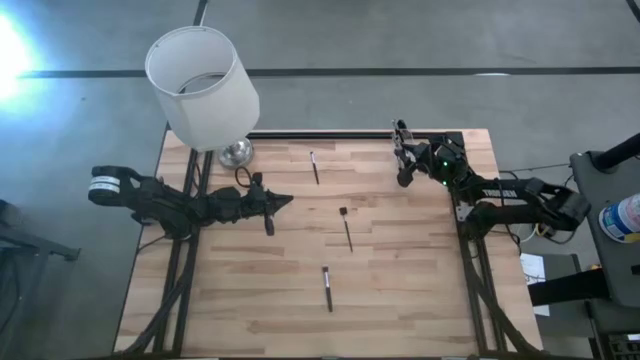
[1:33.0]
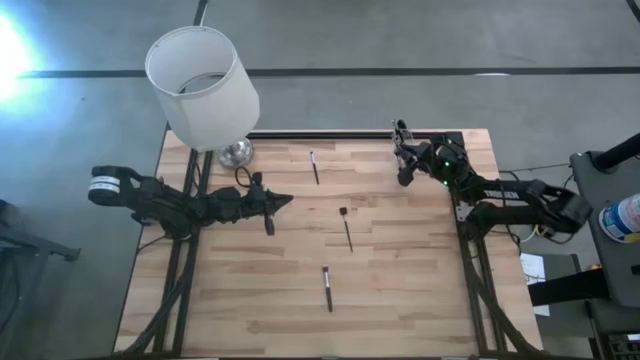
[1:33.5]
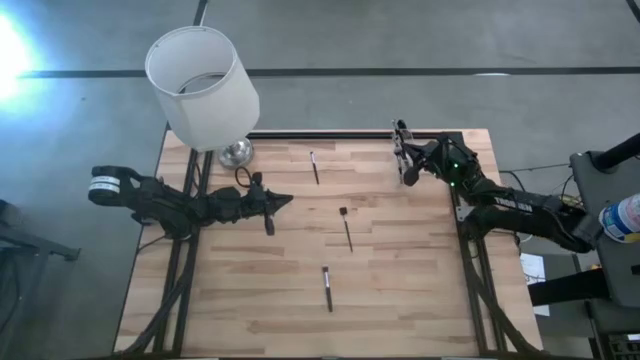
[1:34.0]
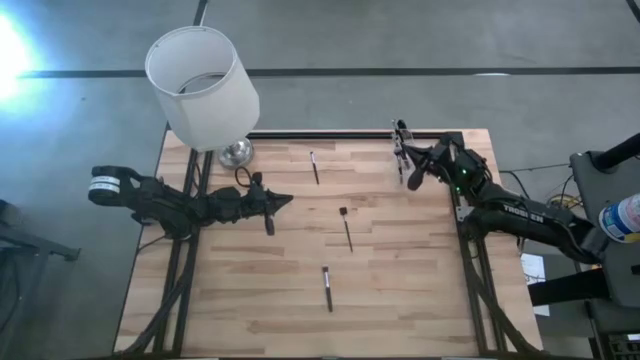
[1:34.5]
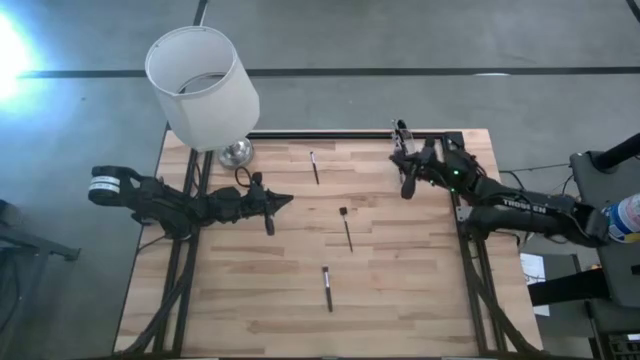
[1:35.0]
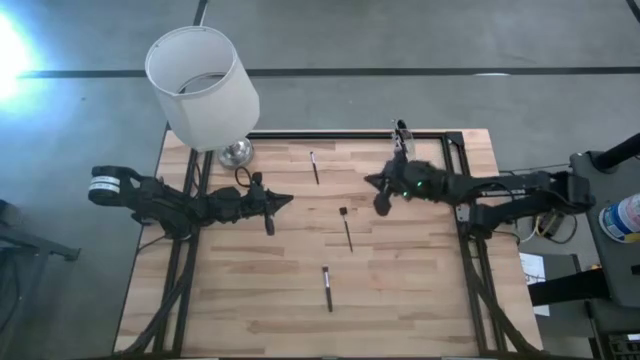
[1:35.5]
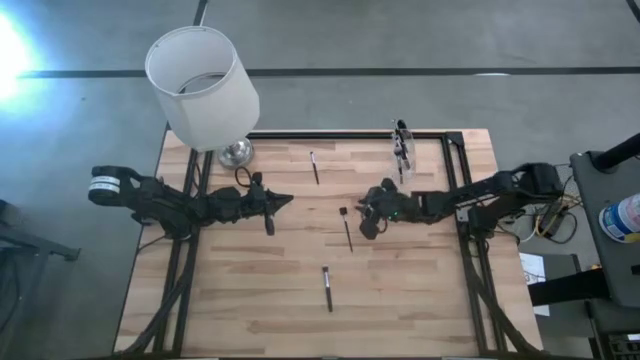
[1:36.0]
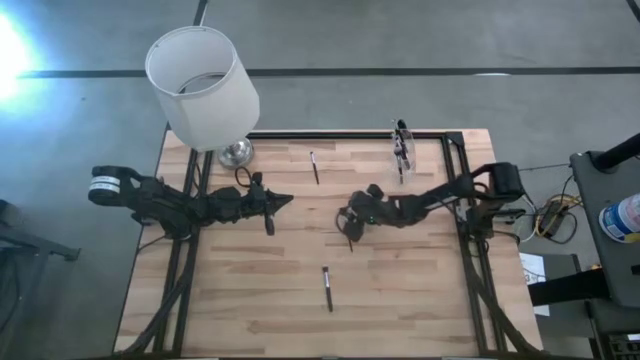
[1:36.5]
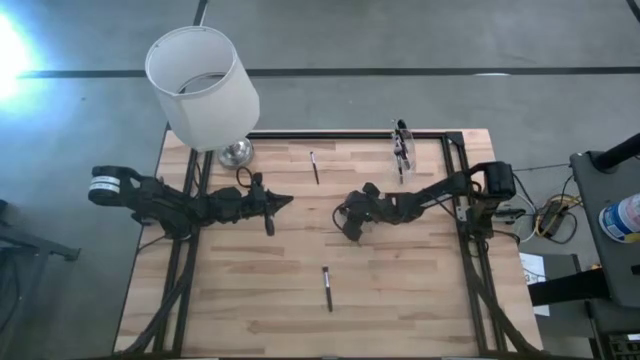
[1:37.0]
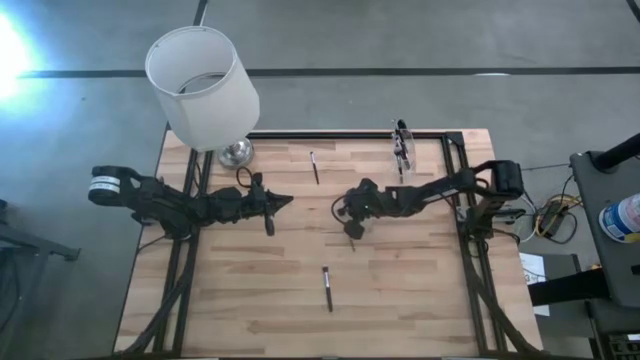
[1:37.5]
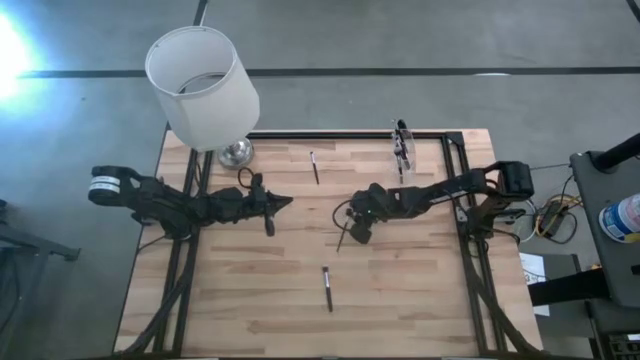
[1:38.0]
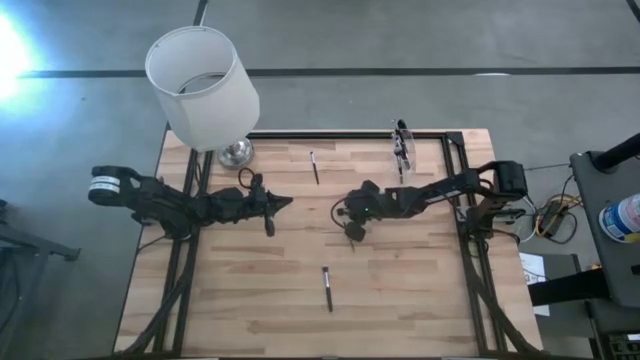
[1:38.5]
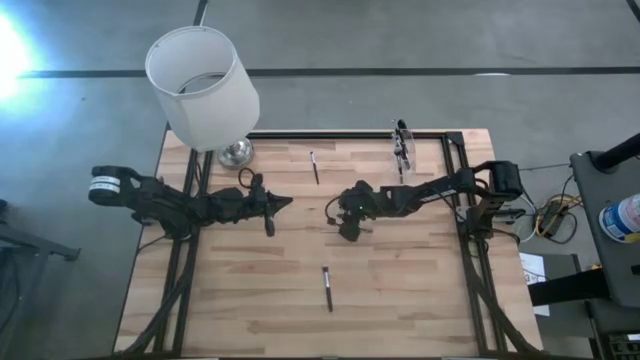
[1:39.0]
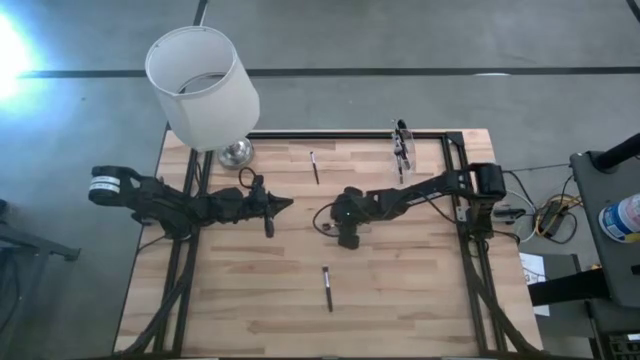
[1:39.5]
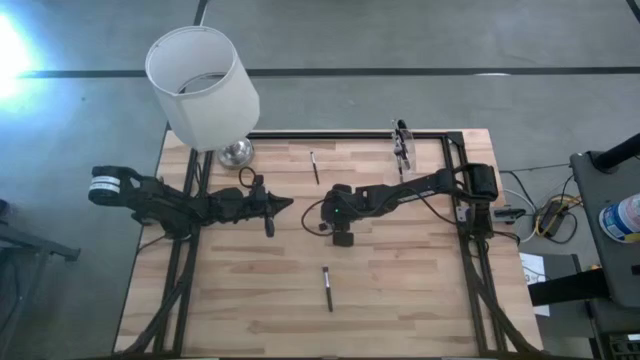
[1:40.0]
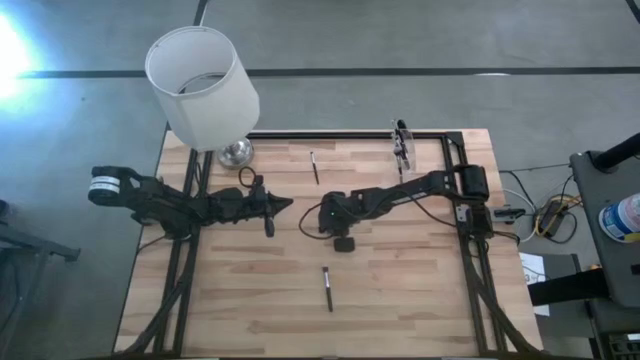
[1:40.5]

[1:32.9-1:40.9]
Task: Put items in baskets/containers
Put the lash brush into the transparent organizer

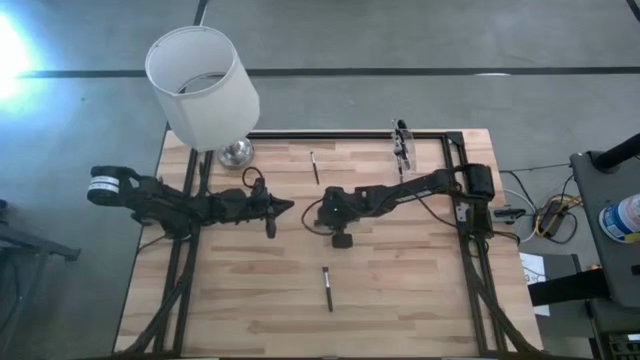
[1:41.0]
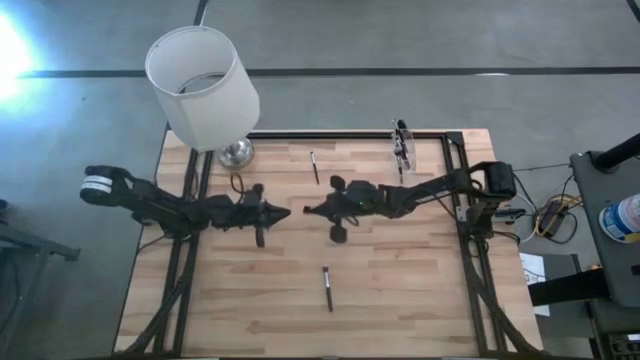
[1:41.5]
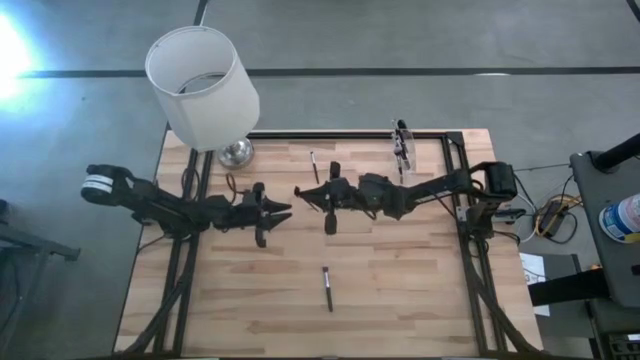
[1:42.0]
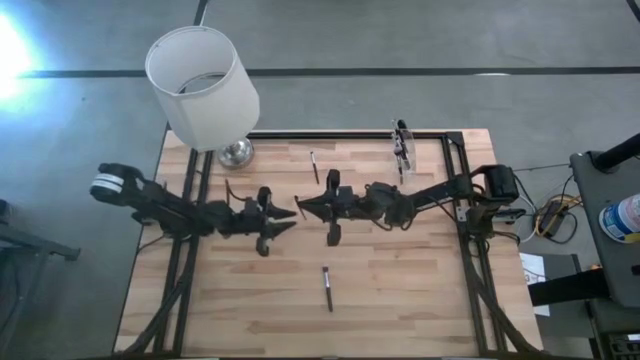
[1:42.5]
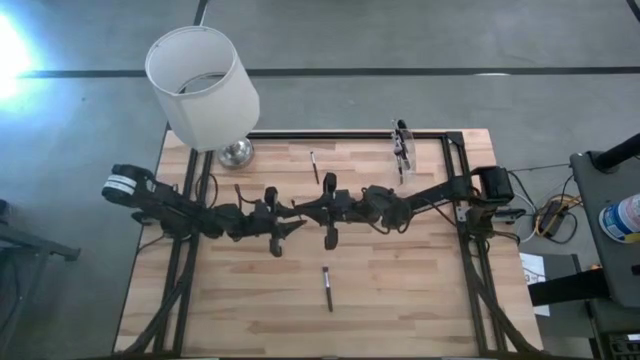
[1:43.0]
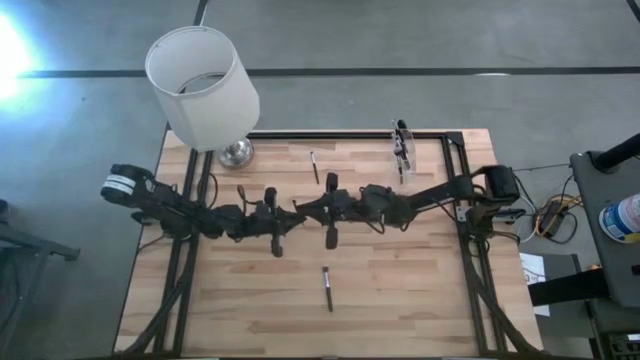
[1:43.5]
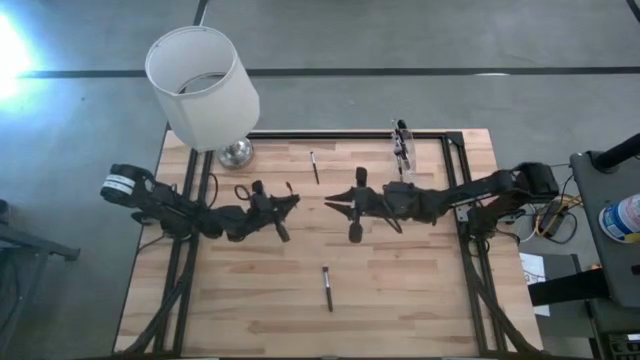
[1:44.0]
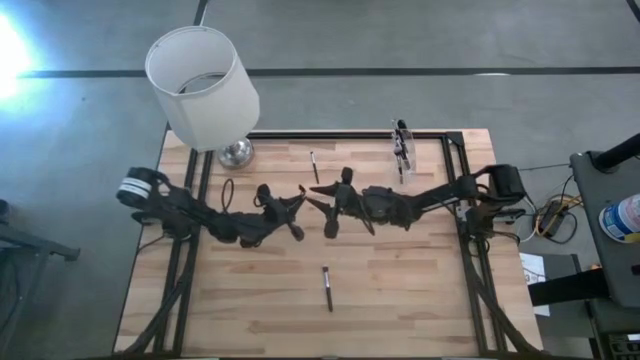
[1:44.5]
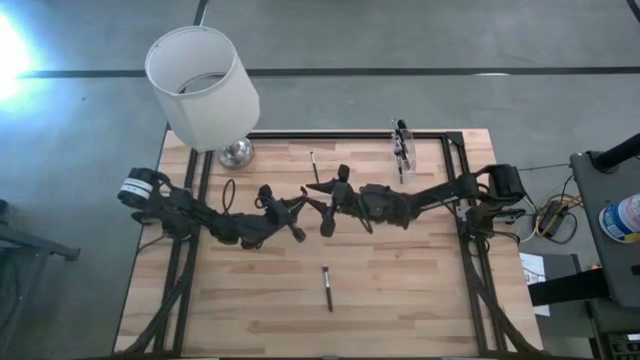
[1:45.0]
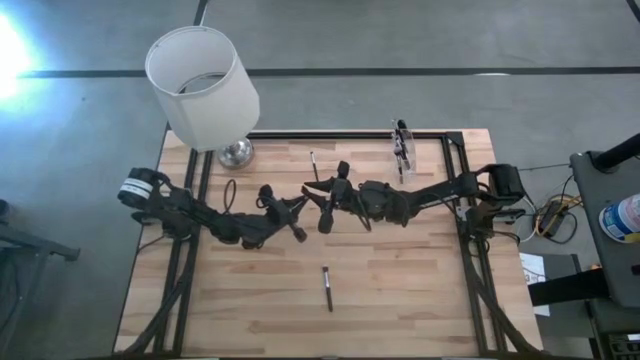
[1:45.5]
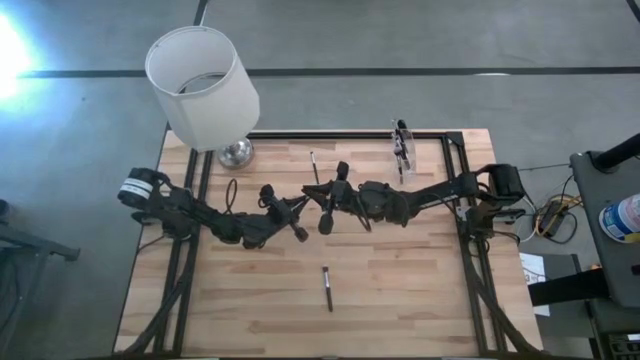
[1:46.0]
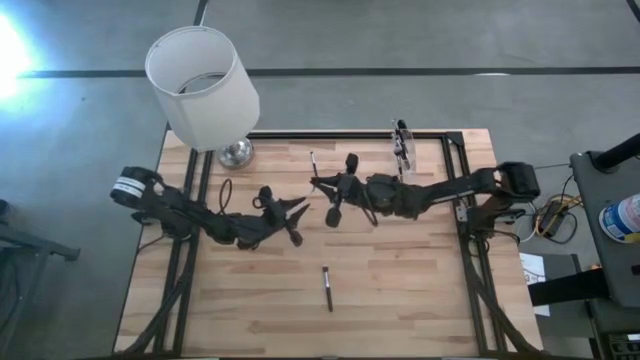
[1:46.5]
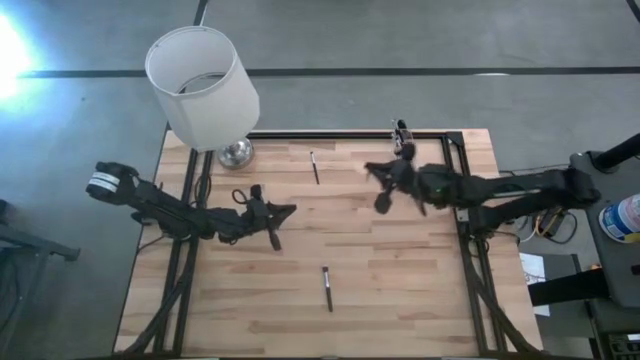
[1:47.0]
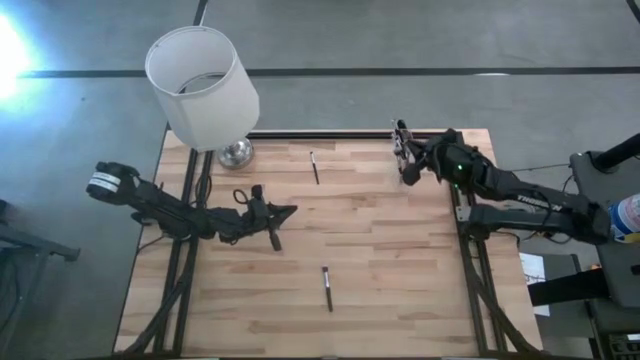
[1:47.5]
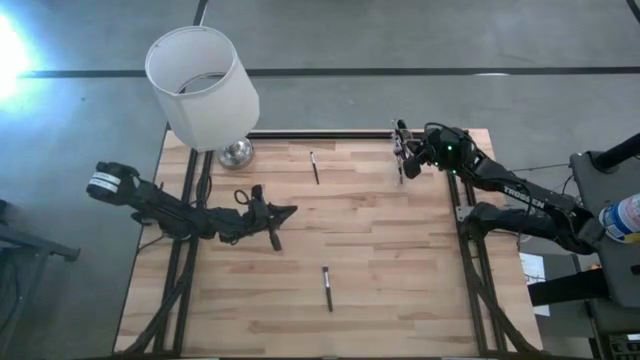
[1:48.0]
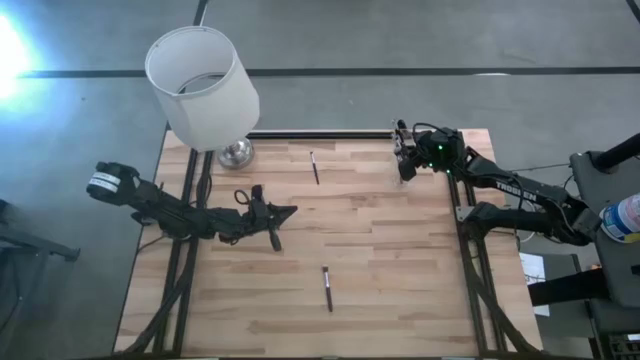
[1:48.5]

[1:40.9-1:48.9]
Put the lash brush into the transparent organizer

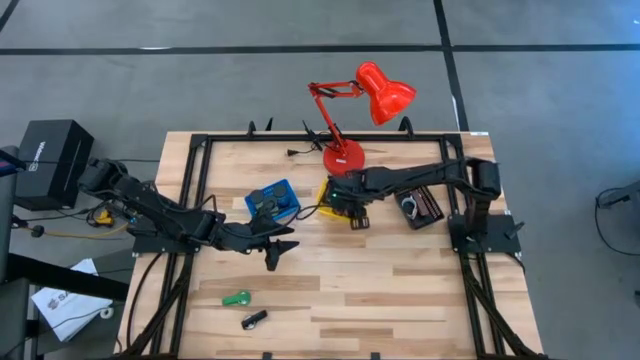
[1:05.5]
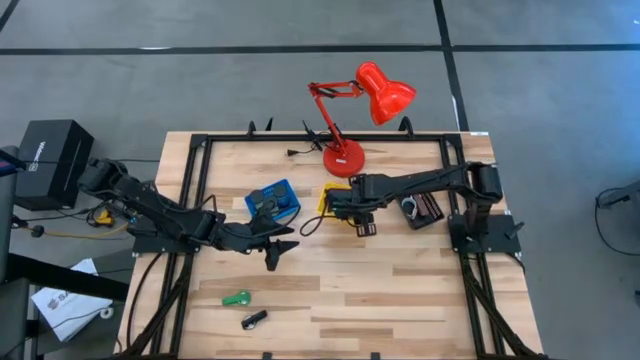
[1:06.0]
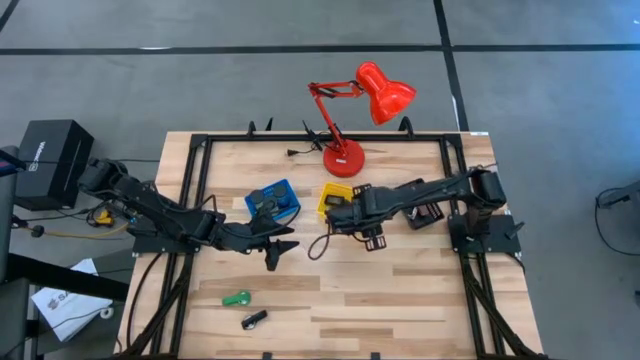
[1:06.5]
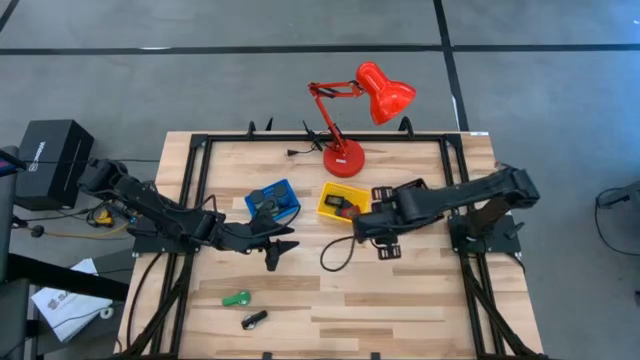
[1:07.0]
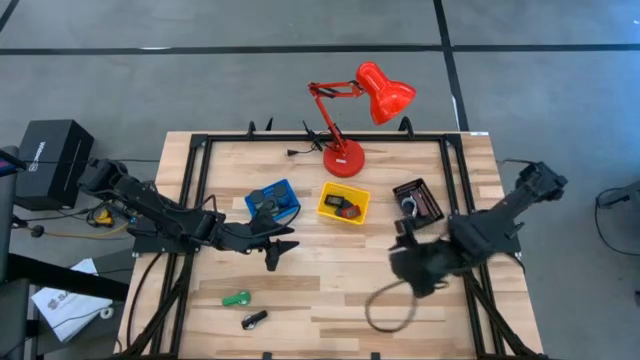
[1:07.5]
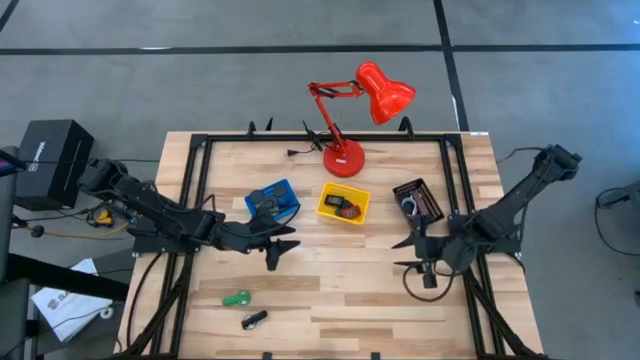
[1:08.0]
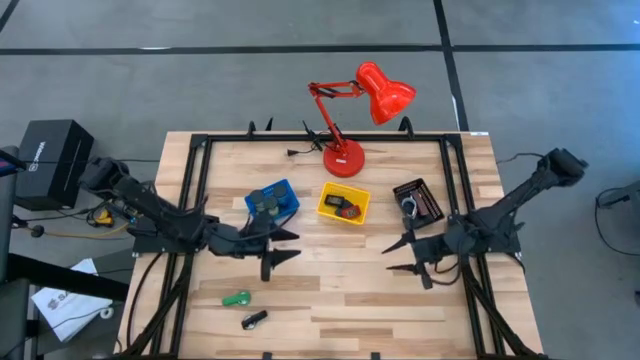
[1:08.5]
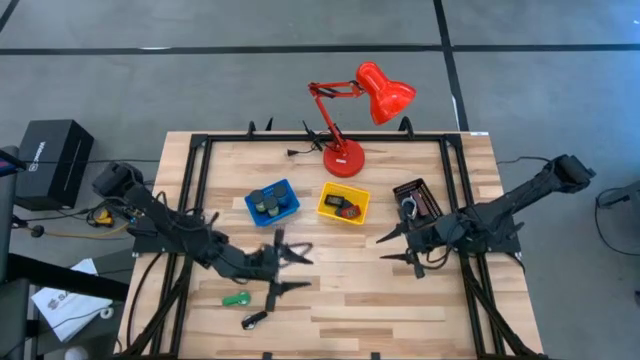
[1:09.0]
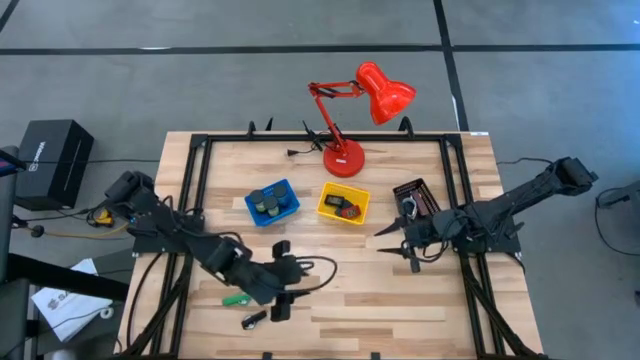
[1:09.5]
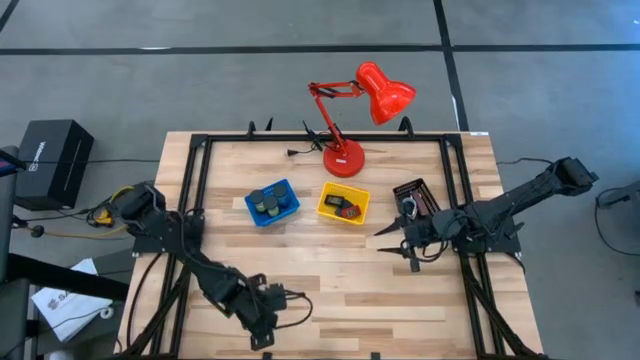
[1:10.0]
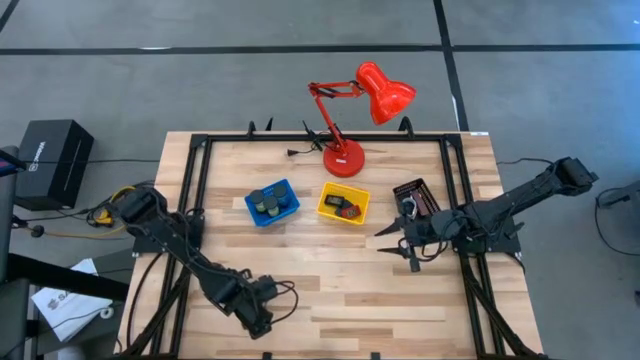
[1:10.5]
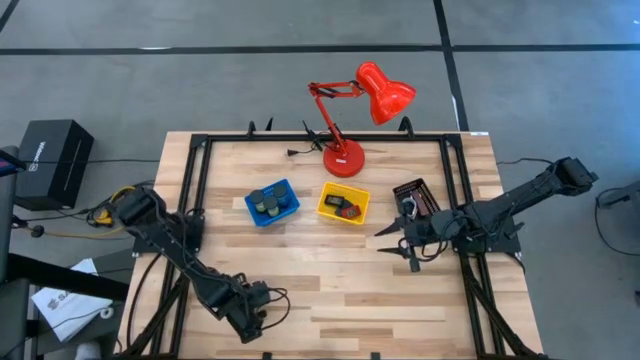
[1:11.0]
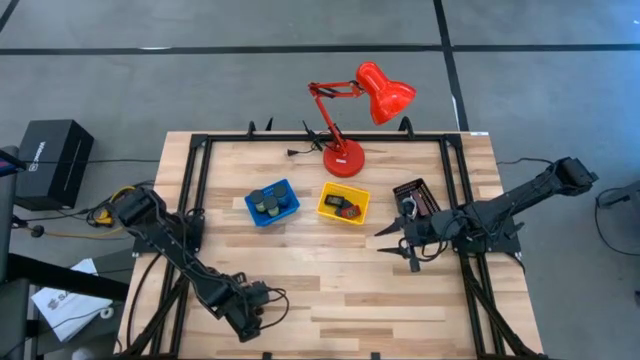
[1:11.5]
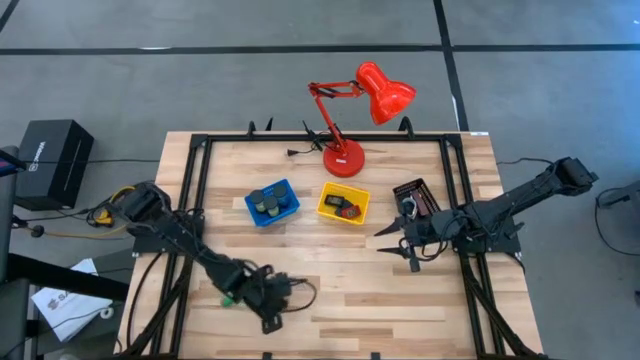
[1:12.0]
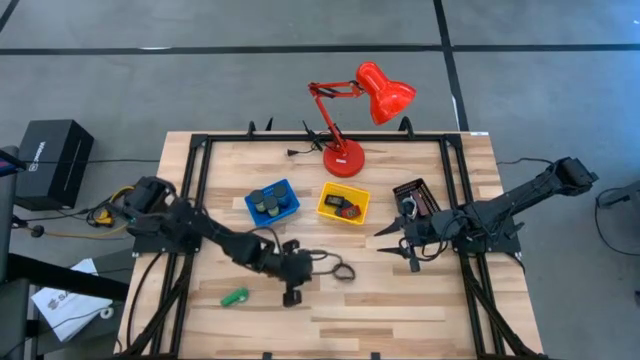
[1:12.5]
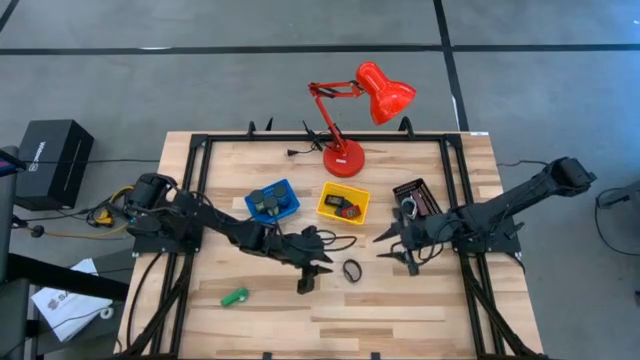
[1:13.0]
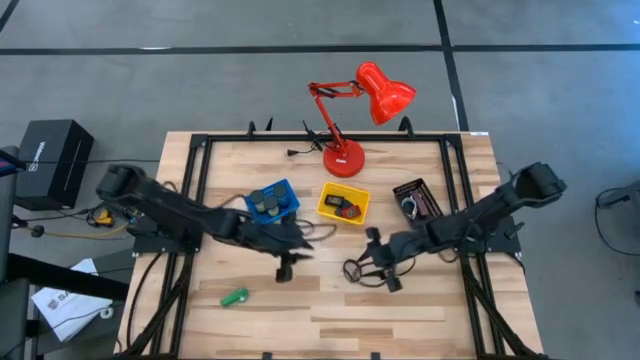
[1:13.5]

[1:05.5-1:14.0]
Task: Pick & Place Office items
Put the black wrist watch into the black bin
